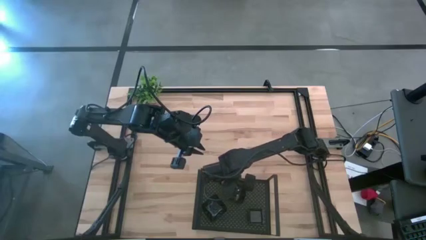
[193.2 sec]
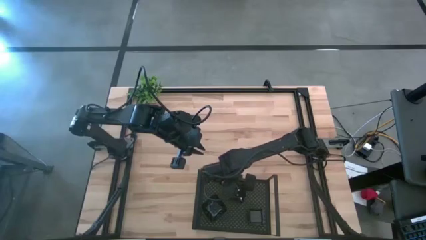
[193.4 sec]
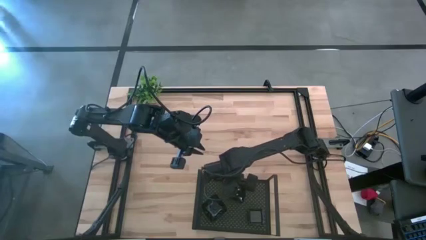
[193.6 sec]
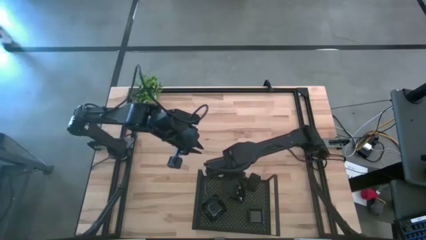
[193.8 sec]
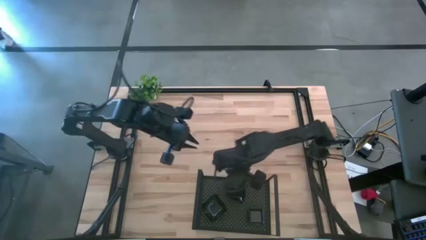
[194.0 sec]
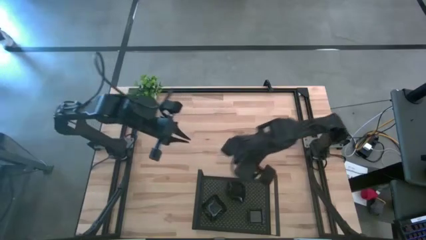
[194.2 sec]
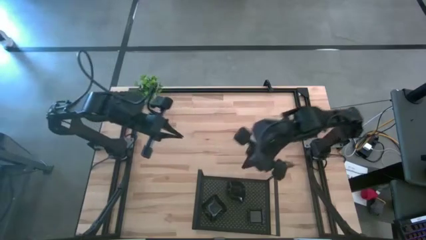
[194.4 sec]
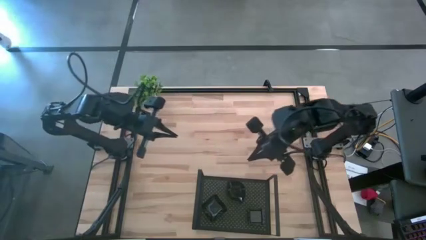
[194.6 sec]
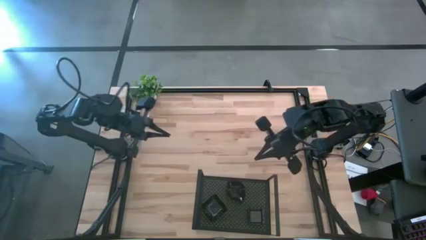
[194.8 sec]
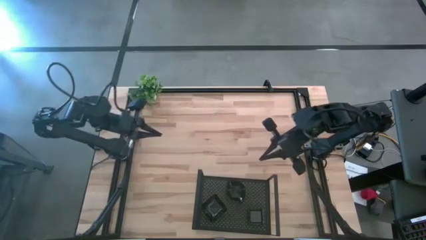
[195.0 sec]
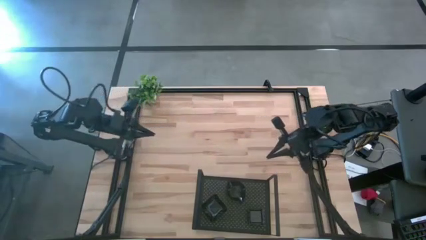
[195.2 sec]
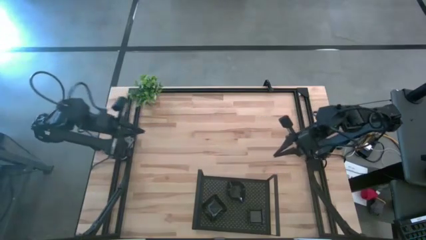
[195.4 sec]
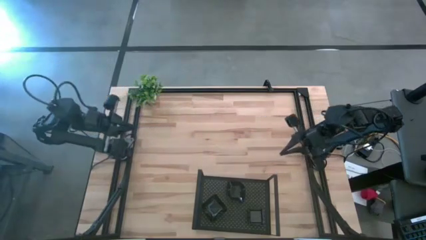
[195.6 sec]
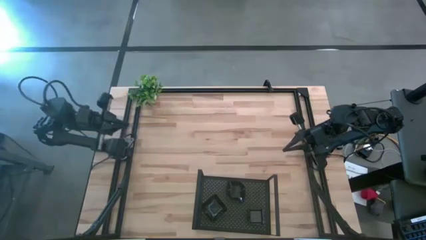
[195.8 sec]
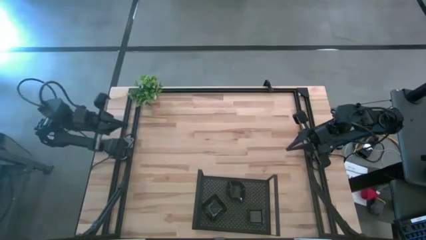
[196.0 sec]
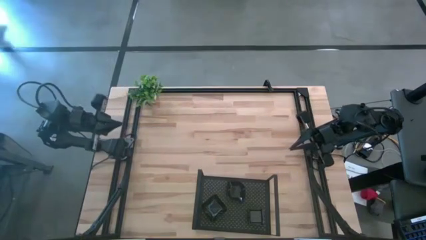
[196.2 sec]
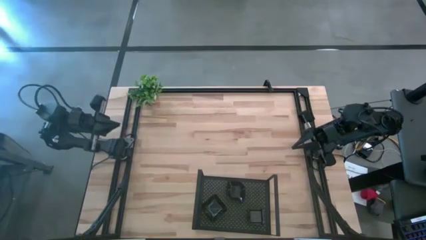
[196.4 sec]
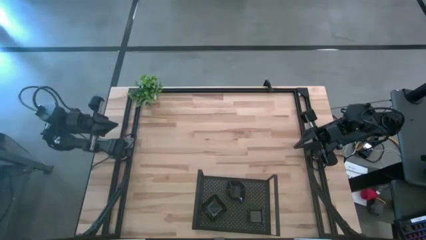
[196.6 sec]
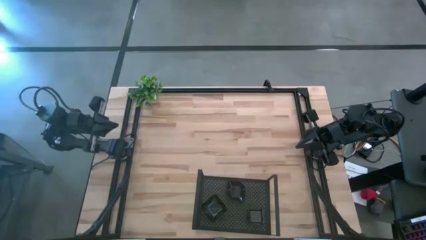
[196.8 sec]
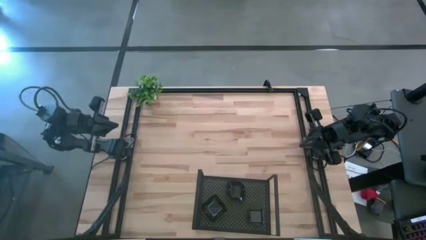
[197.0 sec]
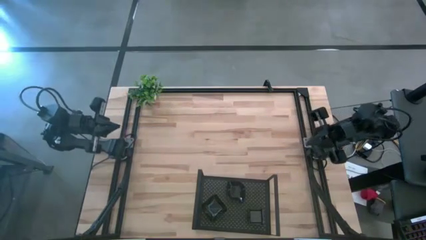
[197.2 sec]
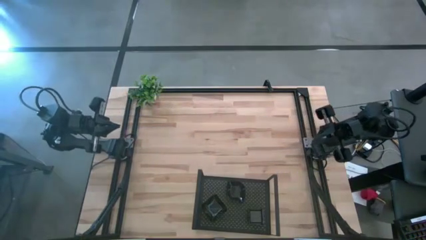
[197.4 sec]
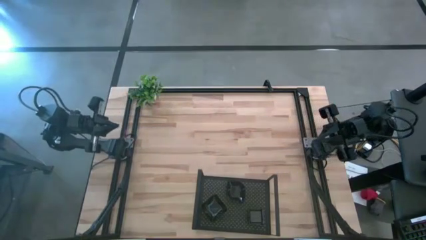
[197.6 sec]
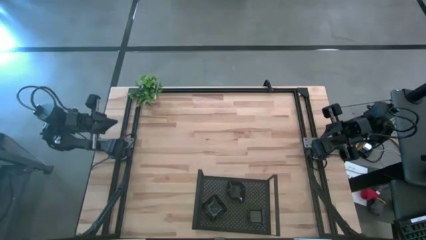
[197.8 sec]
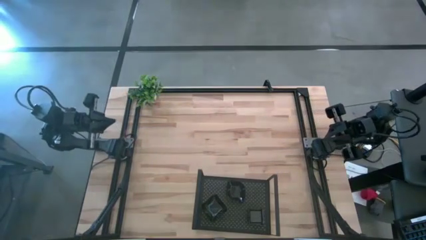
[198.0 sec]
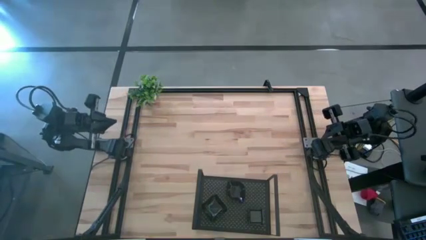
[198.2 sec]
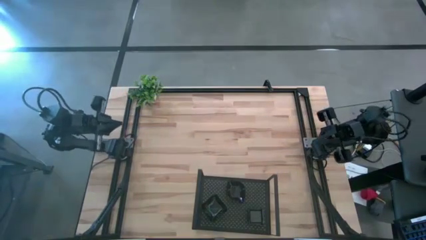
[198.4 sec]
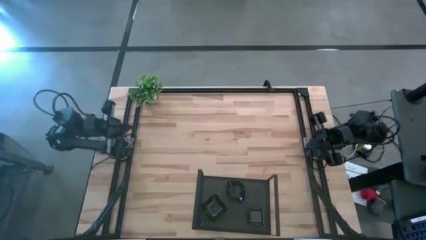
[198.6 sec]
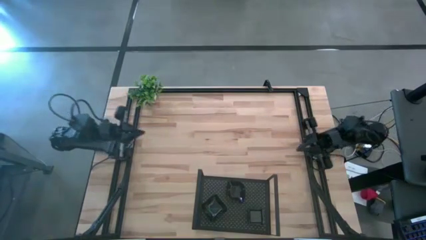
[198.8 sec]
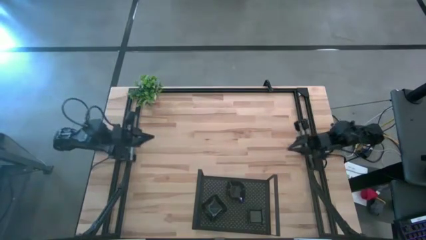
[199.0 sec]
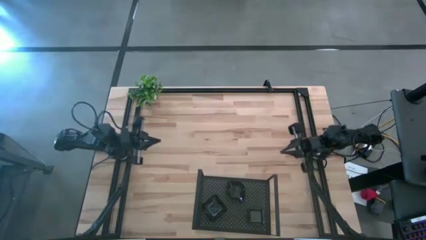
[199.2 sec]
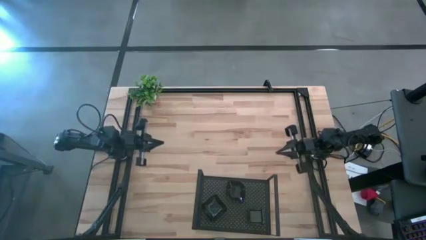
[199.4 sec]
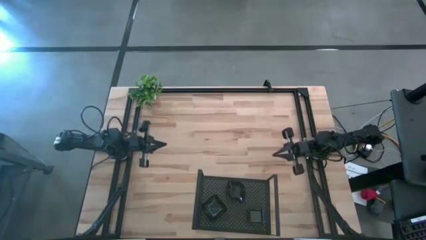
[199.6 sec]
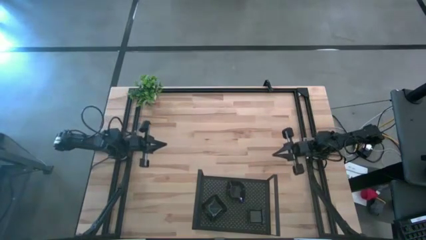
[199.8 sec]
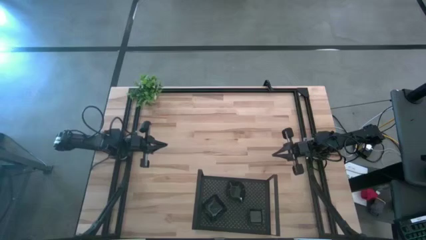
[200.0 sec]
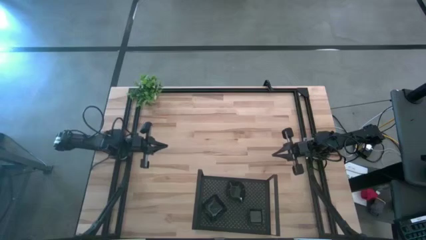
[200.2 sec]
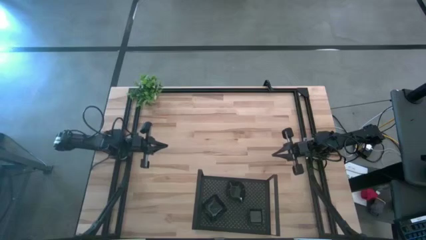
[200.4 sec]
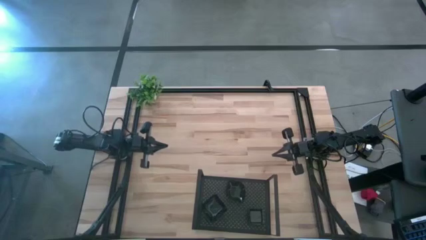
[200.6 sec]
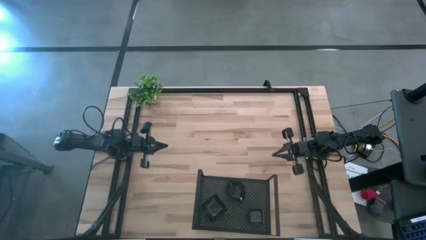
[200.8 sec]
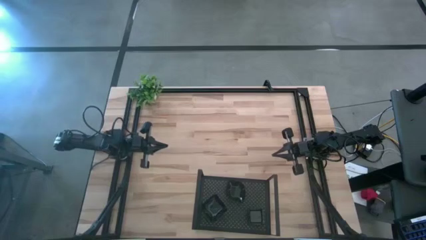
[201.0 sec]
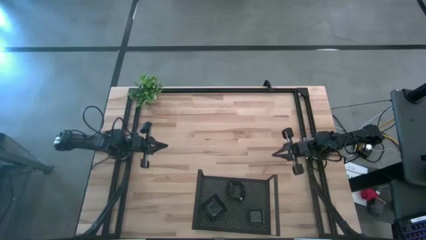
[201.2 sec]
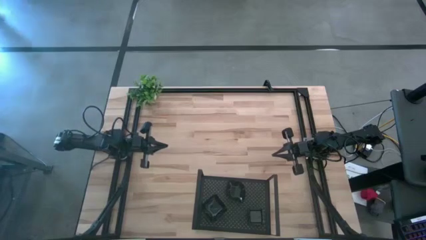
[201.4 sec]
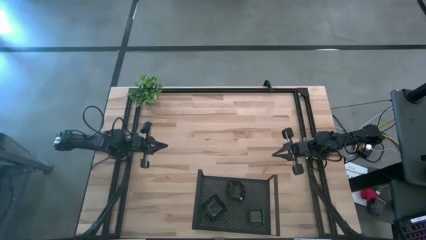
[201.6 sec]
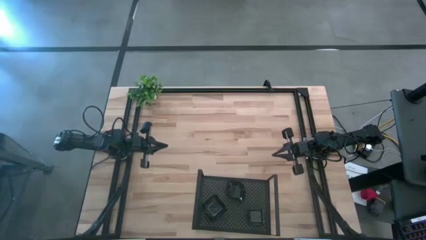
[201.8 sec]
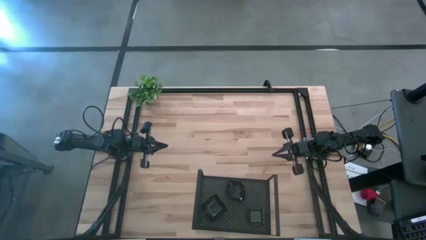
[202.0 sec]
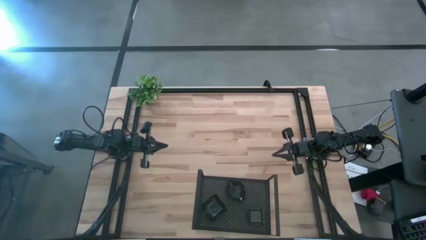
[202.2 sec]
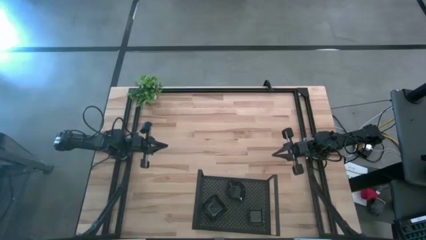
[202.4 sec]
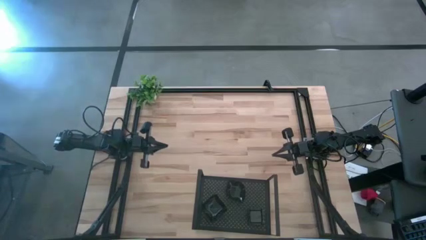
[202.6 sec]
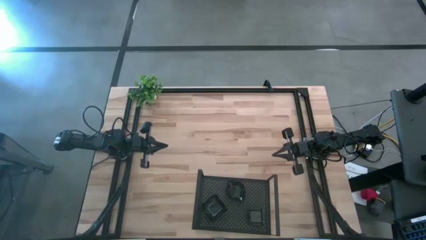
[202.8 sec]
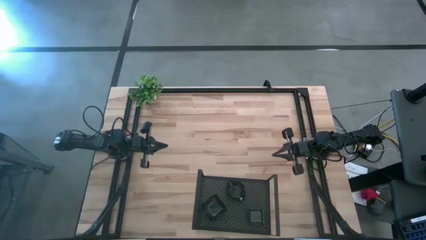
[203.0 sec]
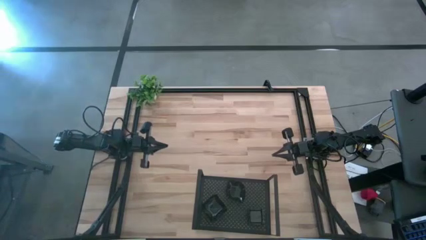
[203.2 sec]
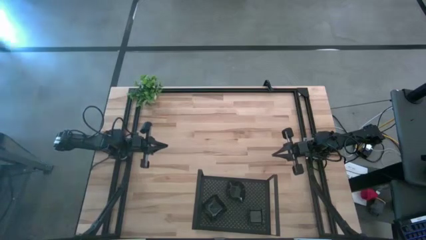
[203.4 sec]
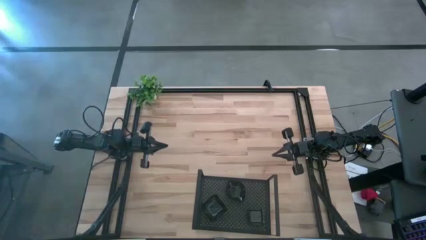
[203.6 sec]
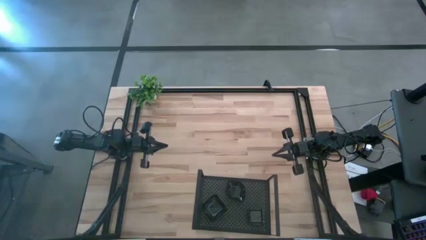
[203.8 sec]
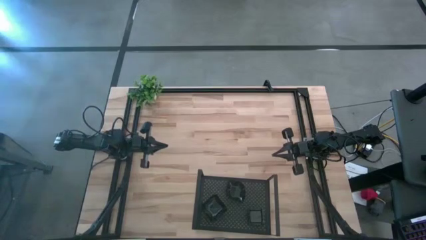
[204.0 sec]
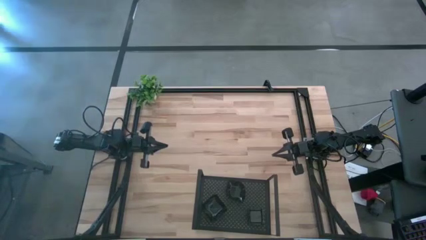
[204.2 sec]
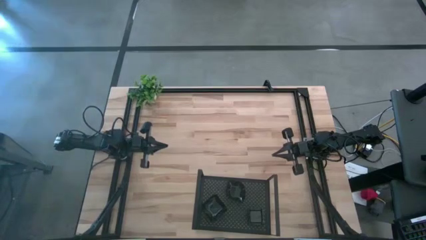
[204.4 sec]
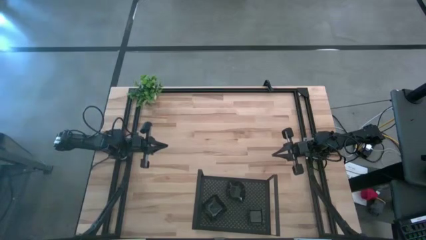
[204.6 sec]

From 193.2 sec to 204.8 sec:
Task: Pick & Place Mini shaped plates
Return to Home Position

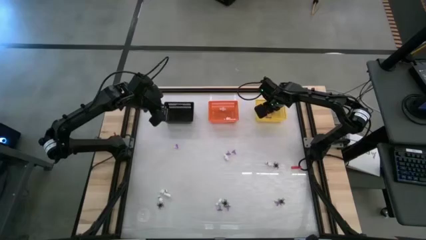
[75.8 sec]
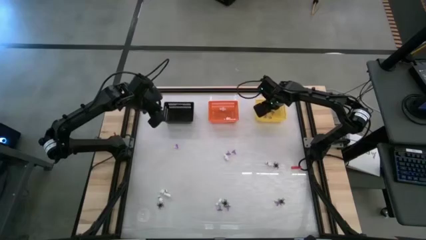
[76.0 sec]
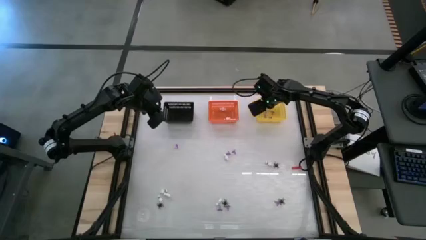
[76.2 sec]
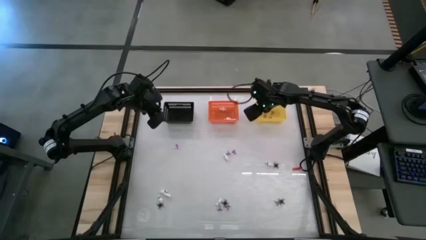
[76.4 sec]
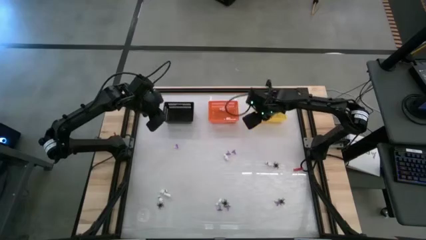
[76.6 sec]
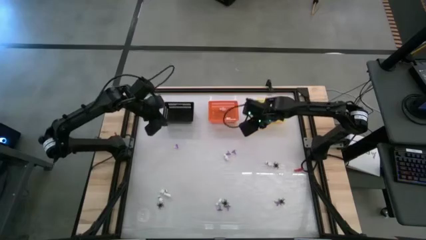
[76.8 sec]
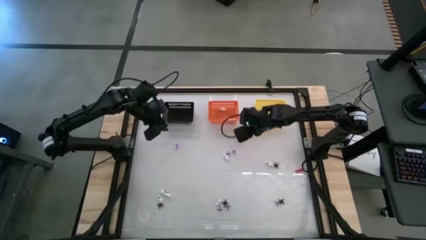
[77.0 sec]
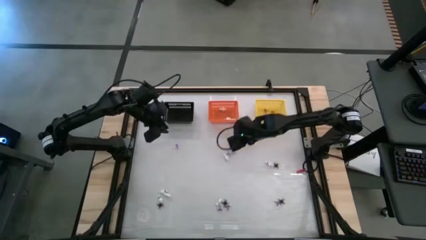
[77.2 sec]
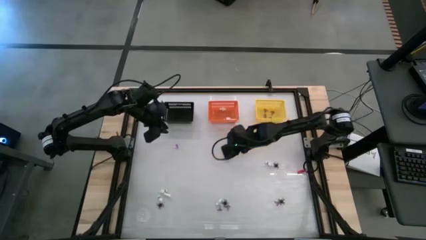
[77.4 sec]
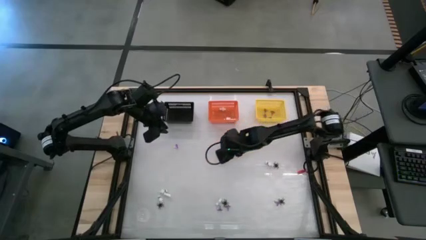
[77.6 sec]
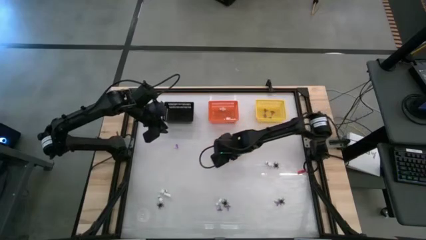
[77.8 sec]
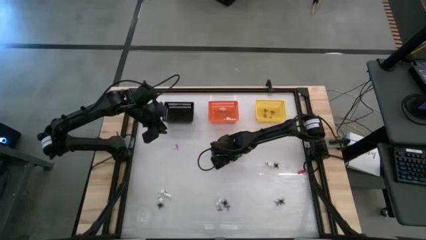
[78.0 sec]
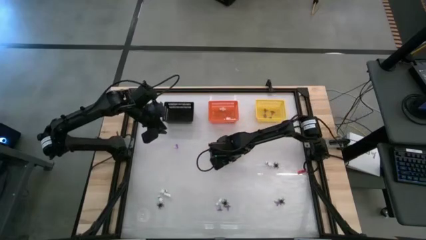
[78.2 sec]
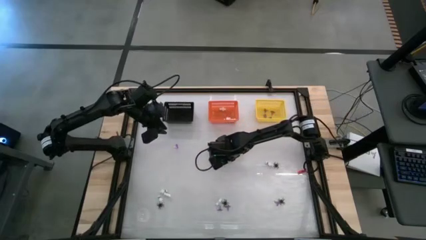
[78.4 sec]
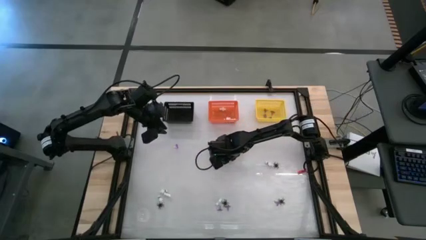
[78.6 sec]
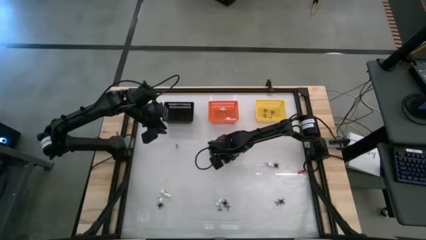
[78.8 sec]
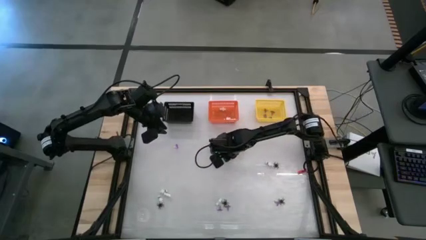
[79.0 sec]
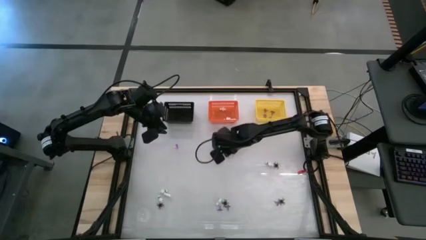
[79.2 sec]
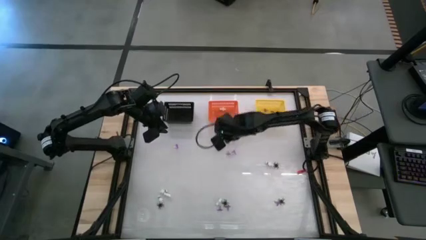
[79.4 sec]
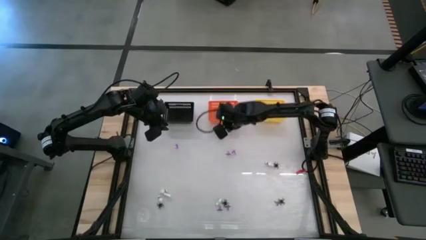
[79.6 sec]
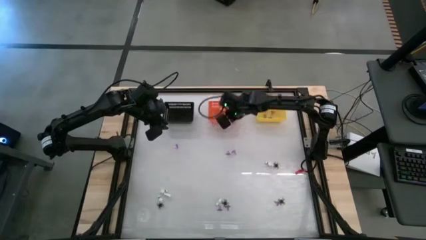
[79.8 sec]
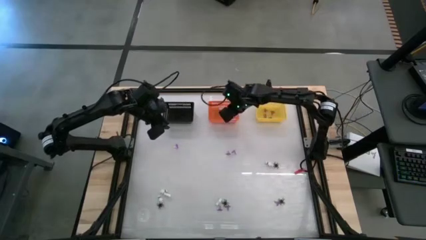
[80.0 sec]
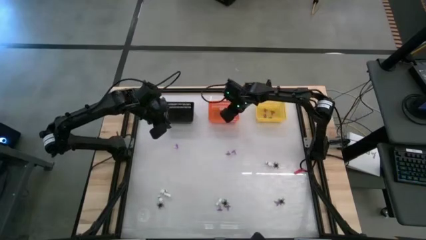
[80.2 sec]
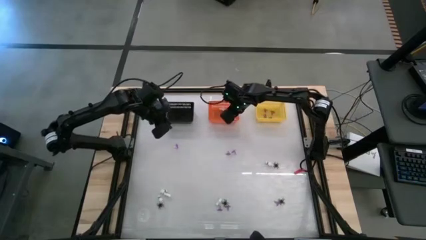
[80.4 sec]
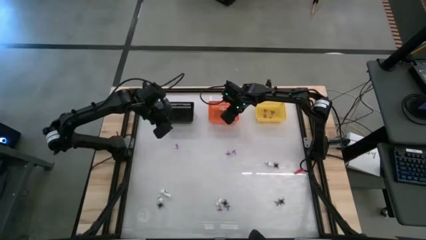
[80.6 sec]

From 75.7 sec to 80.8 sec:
Task: Sort Halloween decoration
Put the skeleton toy into the orange bin
